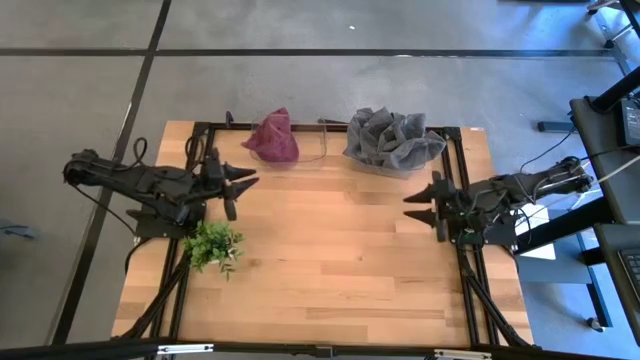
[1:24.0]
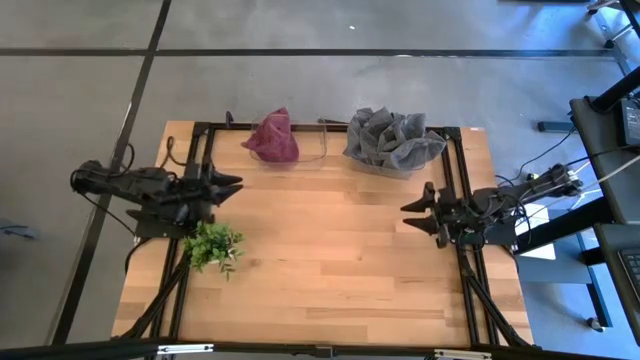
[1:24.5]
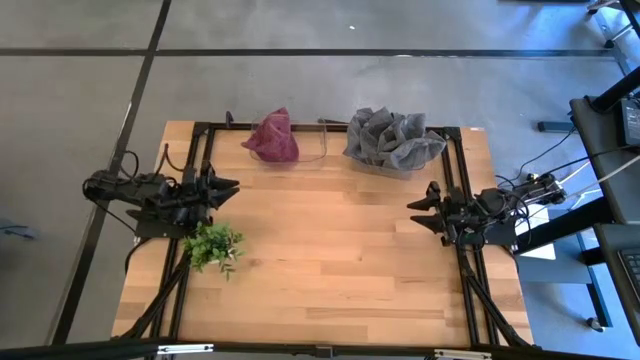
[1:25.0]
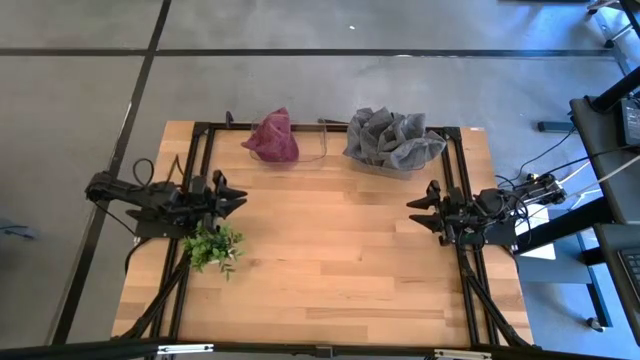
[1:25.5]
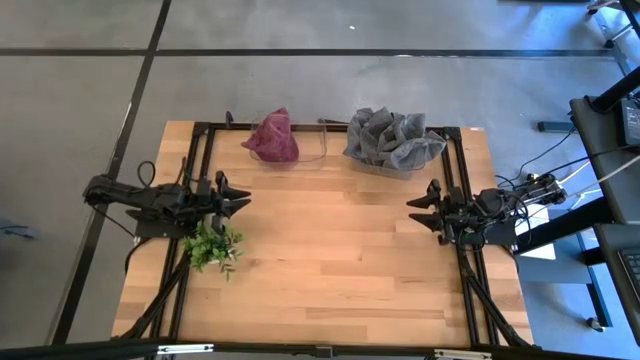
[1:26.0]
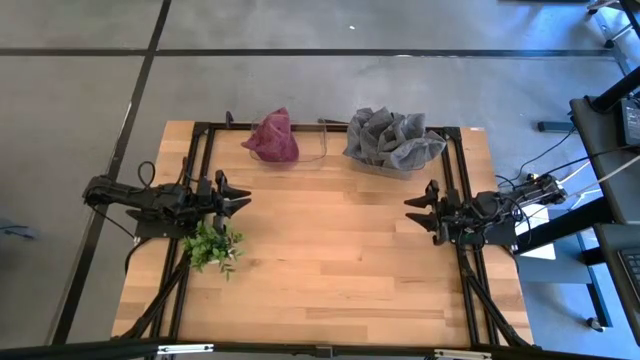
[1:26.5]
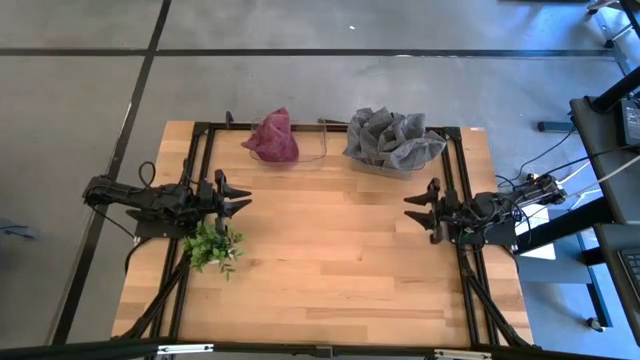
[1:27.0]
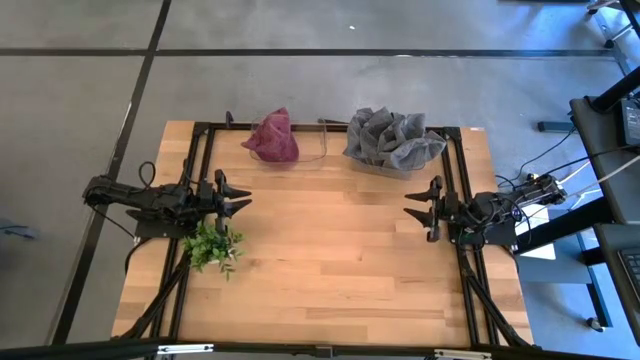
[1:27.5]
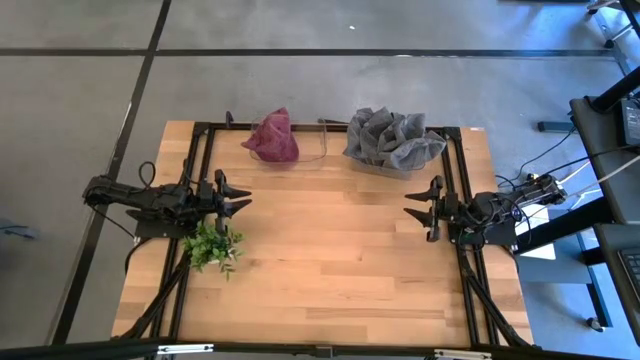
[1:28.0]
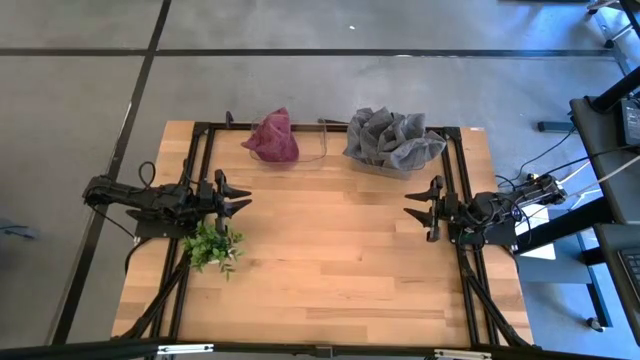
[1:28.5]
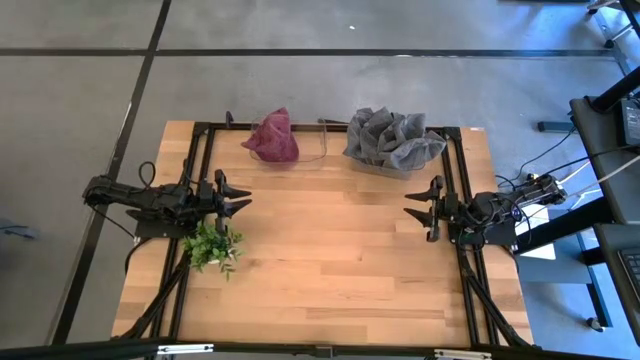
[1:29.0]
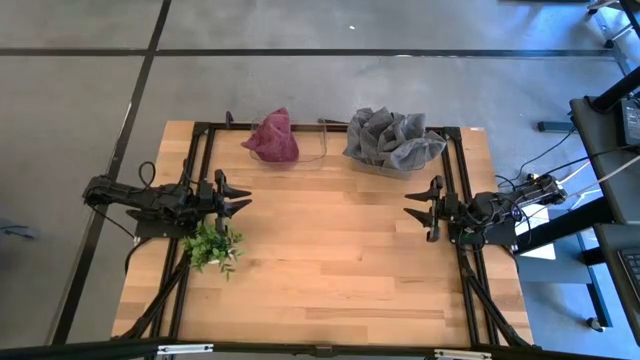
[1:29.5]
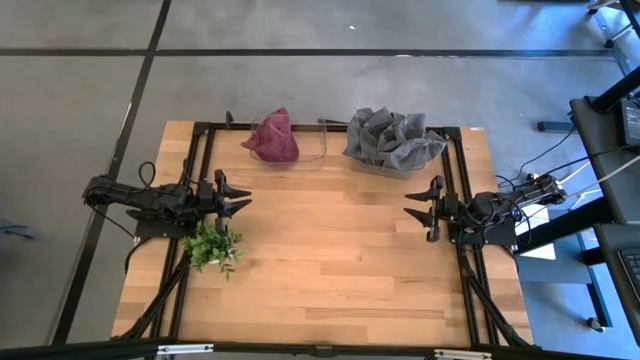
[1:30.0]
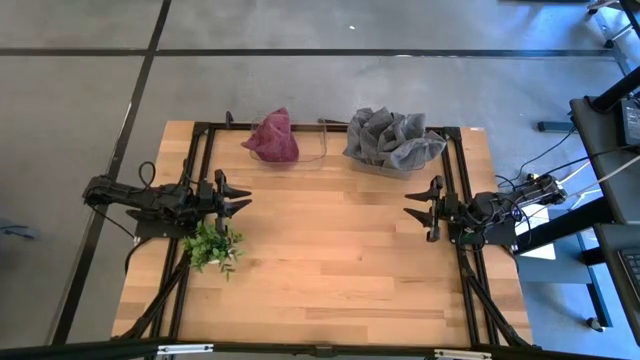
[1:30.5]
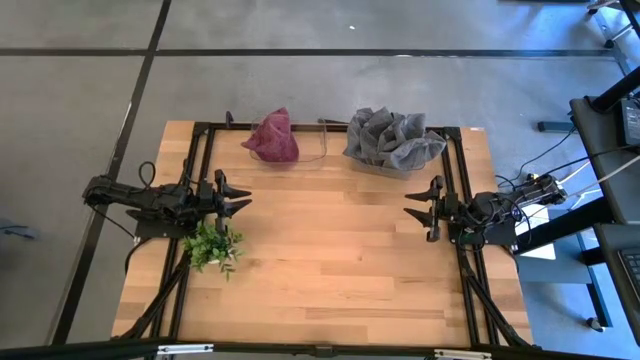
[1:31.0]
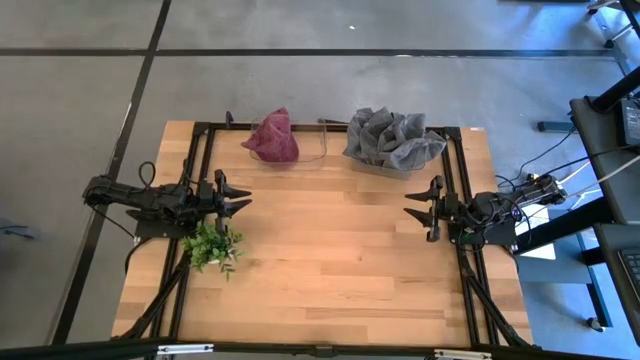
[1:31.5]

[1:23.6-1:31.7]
Task: Pick & Place hat
Return to Home Position

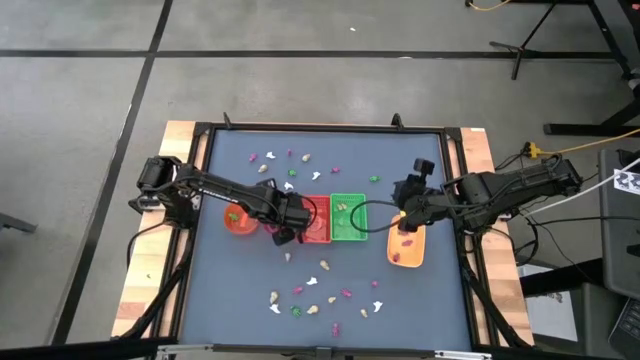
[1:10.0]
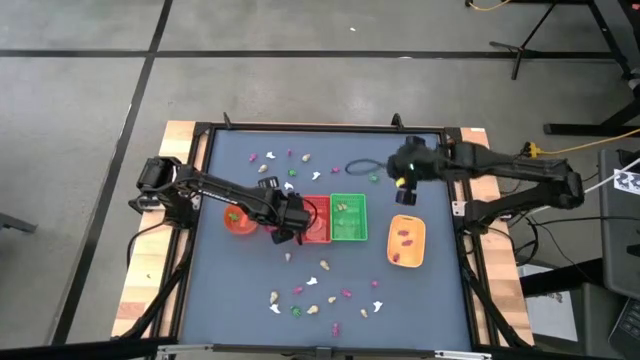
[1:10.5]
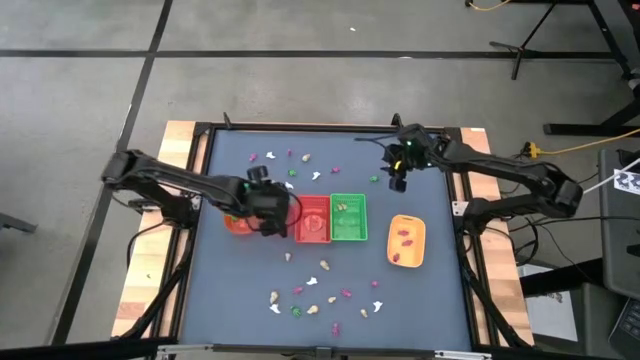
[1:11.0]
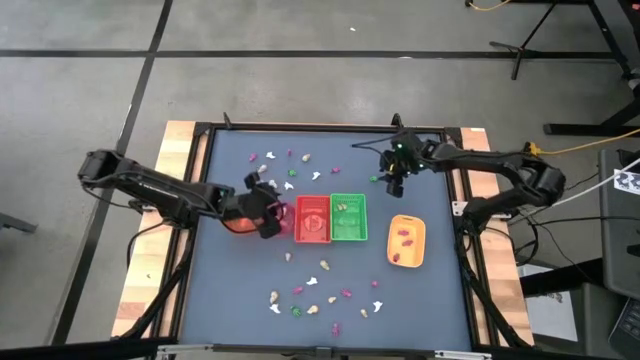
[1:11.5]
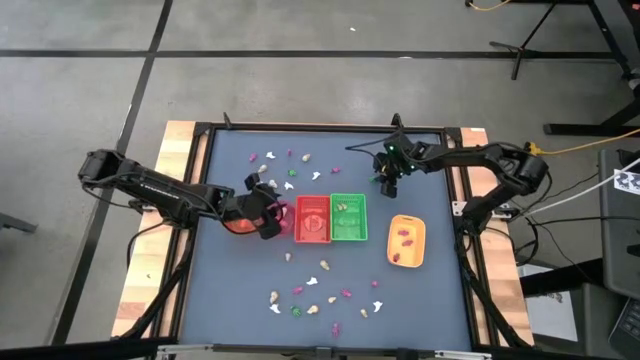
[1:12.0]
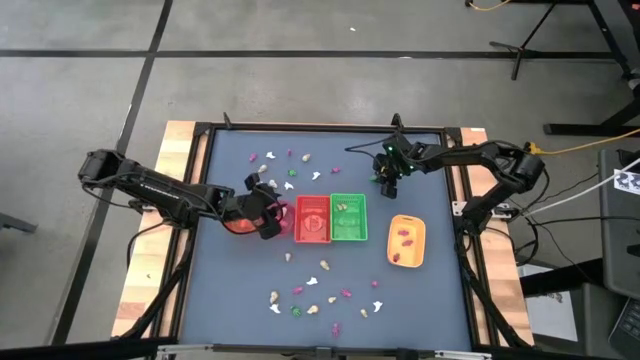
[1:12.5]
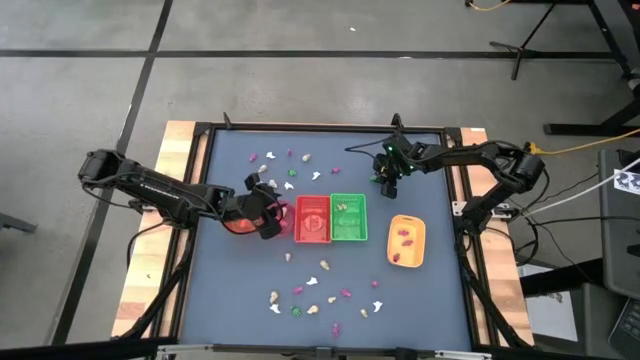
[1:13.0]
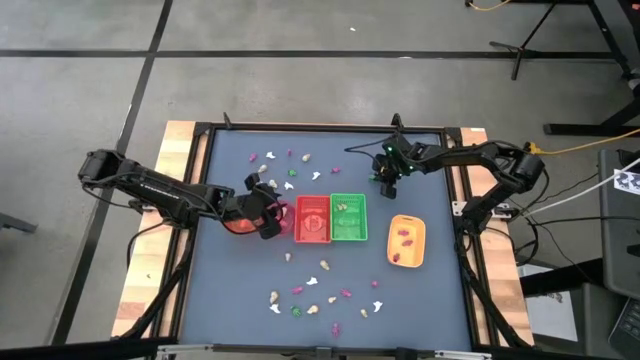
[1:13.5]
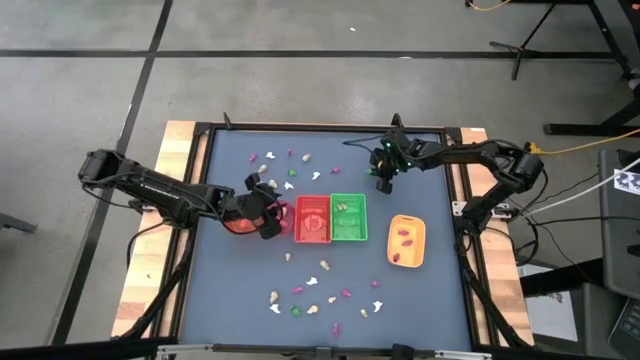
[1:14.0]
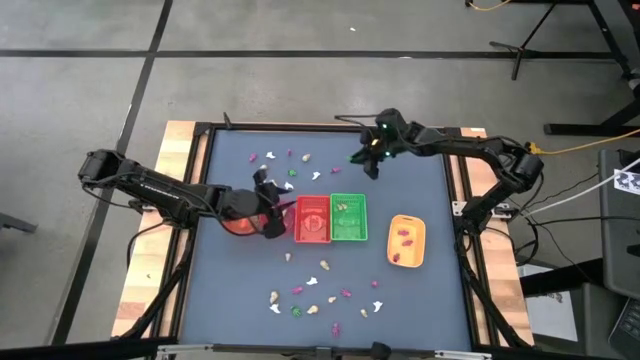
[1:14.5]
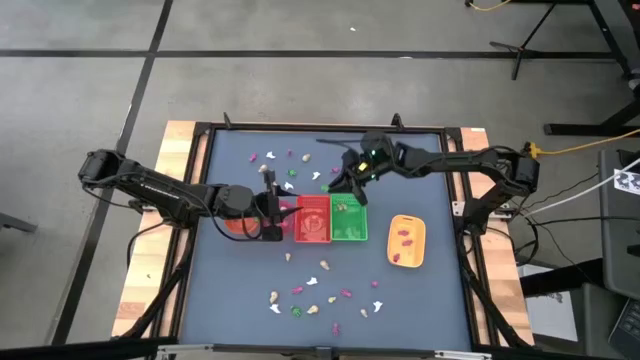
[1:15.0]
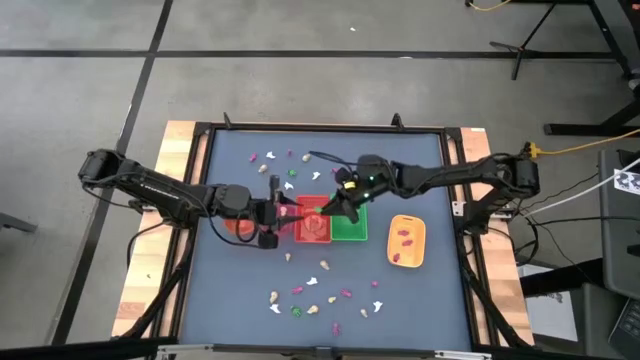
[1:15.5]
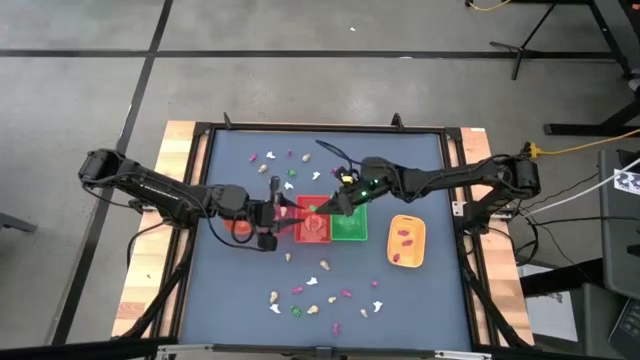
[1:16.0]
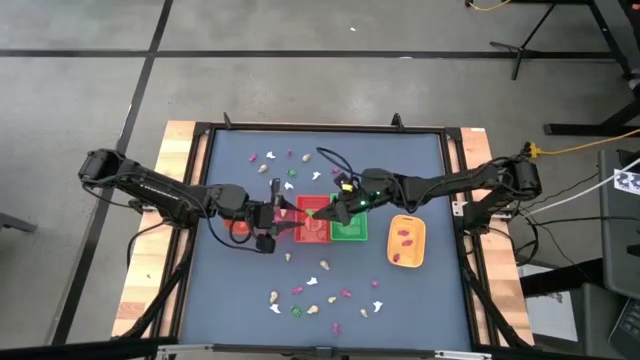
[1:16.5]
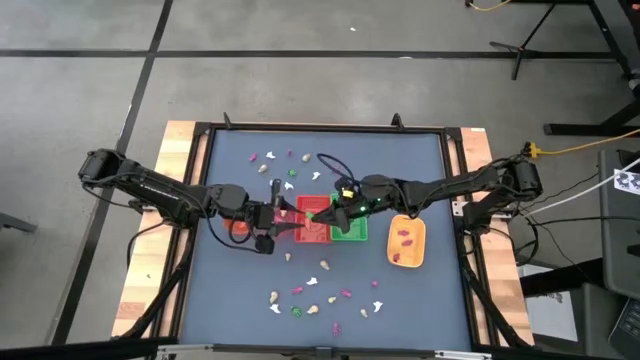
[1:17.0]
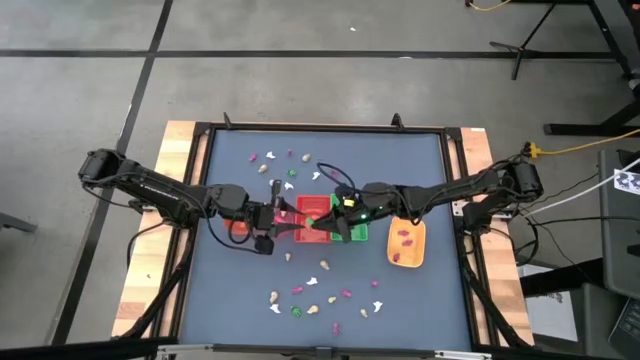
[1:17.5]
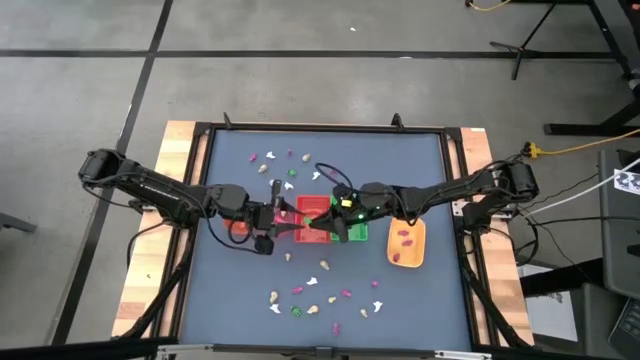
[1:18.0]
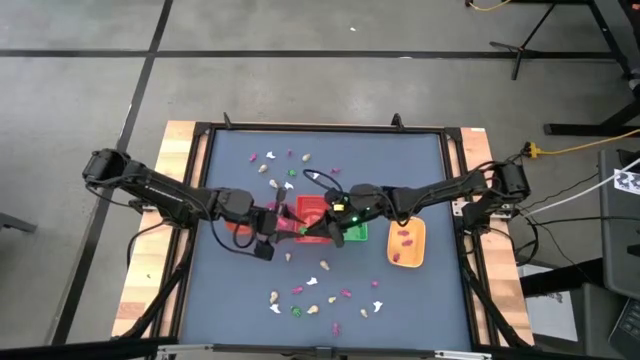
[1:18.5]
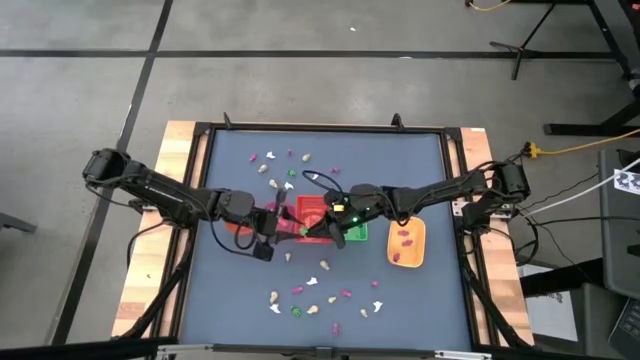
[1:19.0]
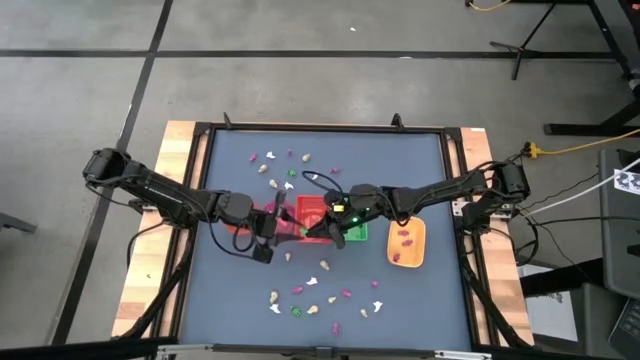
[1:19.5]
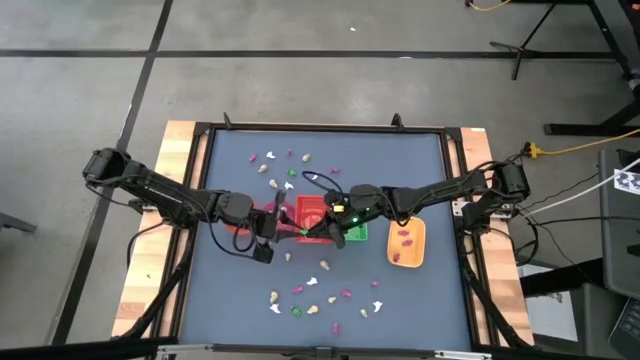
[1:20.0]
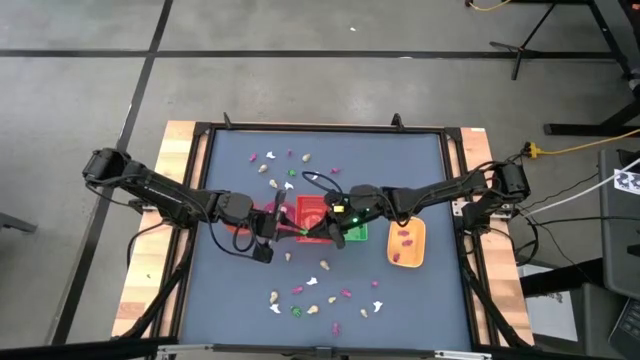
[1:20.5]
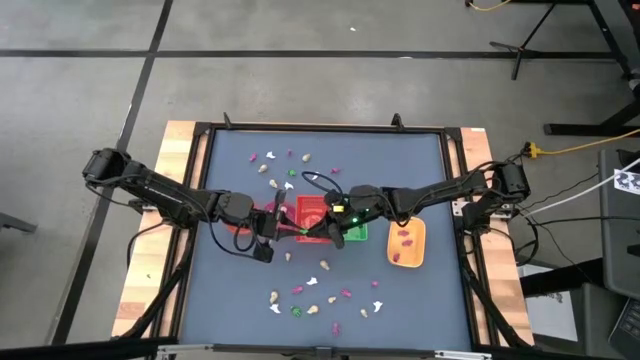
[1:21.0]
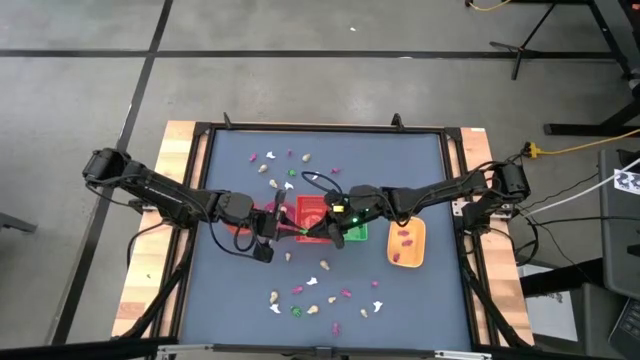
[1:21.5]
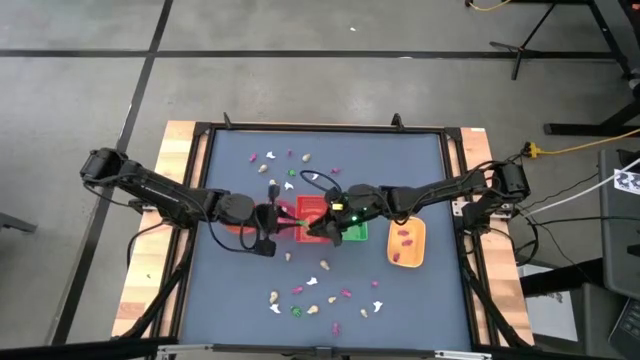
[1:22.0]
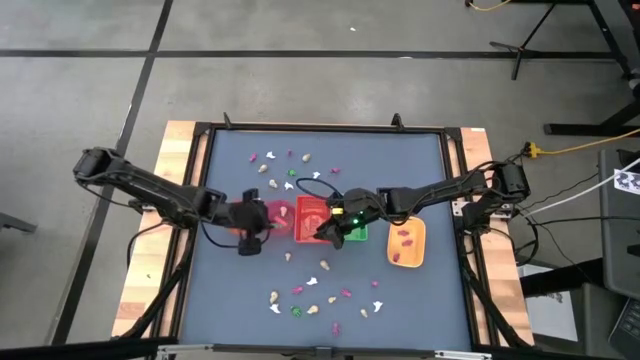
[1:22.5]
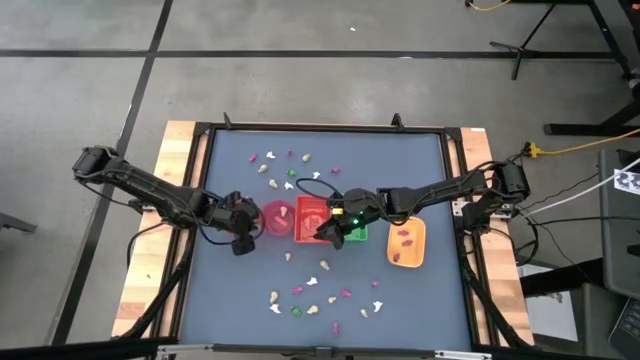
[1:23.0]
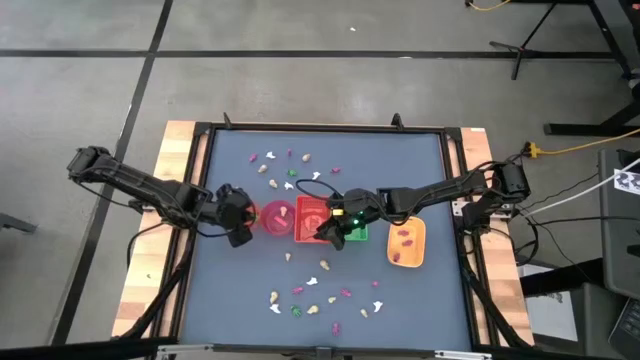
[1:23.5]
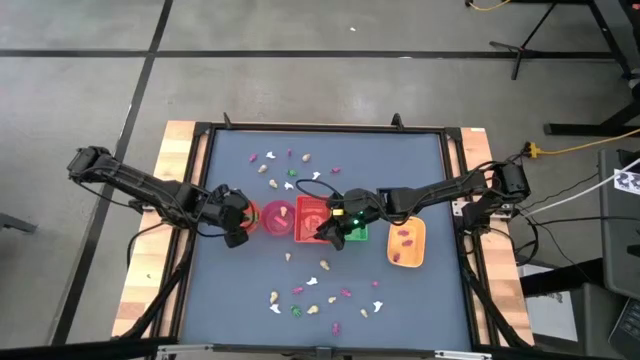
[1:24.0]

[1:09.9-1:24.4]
Task: Sort Halloween decoration
Put the green skeleton toy into the orange bowl
